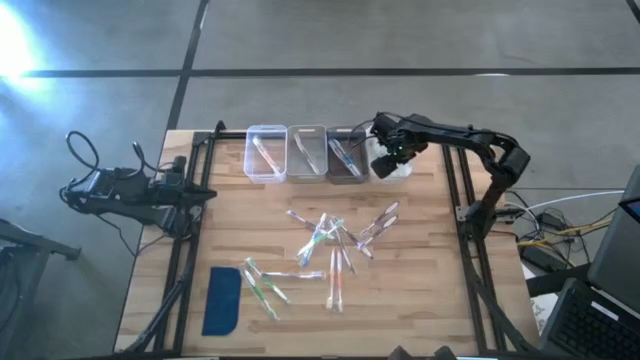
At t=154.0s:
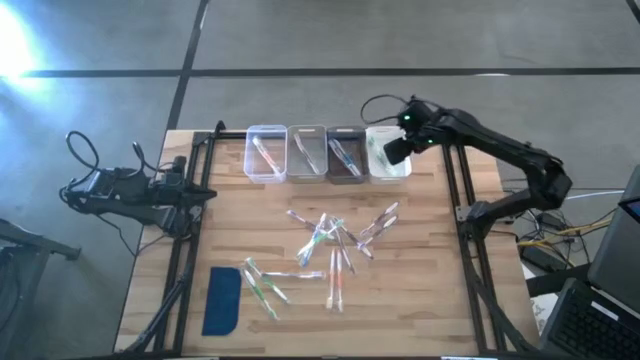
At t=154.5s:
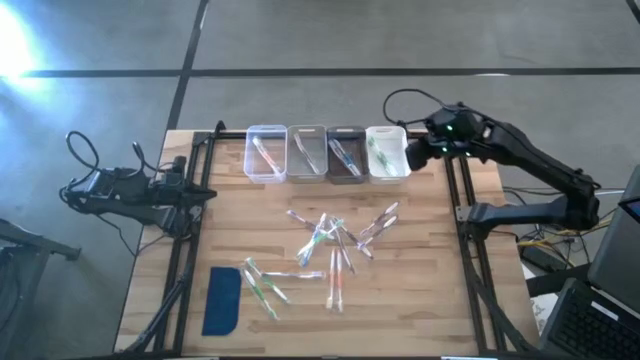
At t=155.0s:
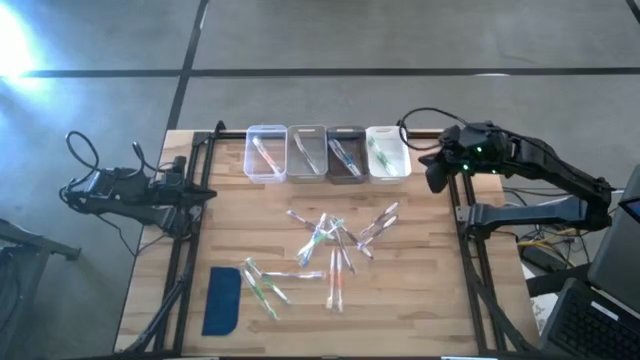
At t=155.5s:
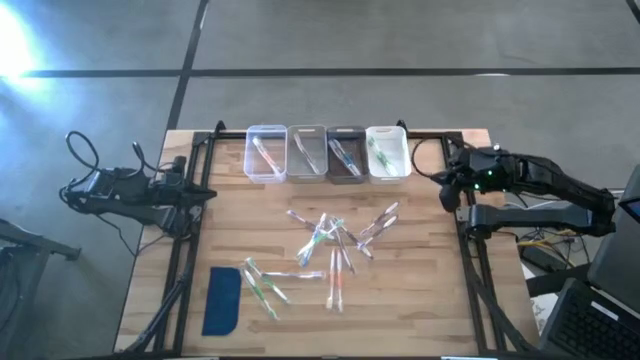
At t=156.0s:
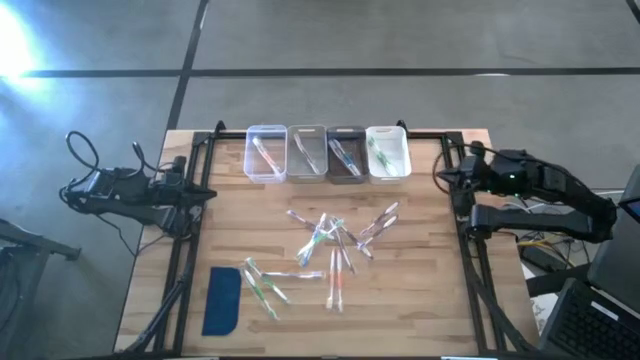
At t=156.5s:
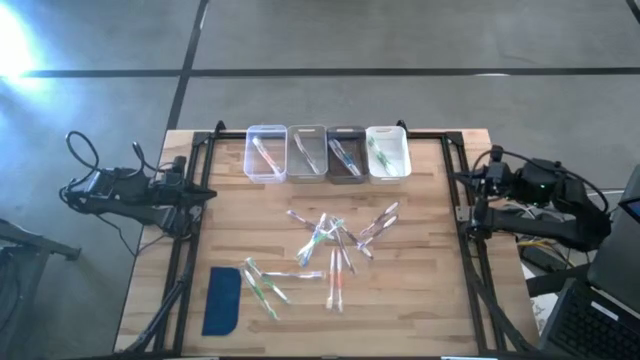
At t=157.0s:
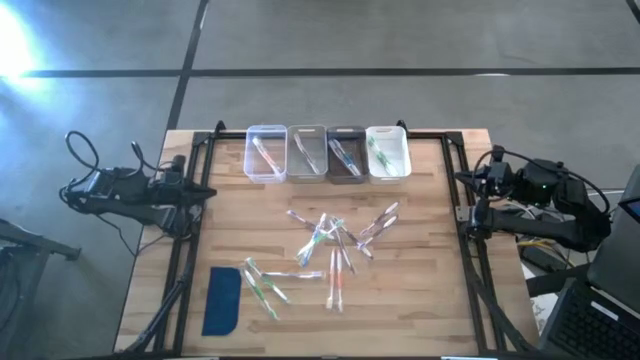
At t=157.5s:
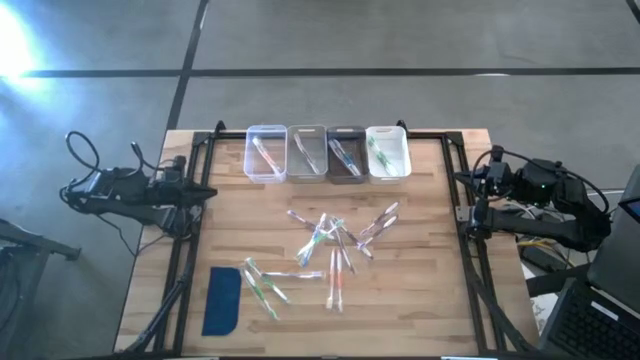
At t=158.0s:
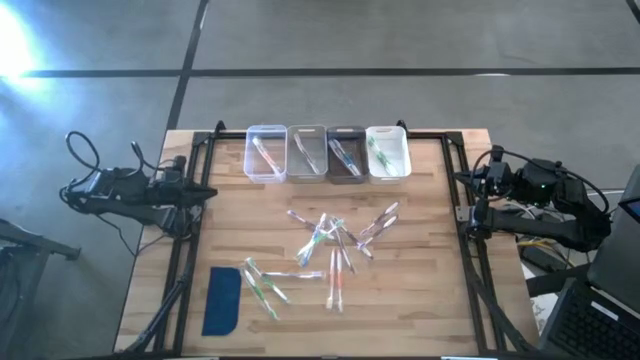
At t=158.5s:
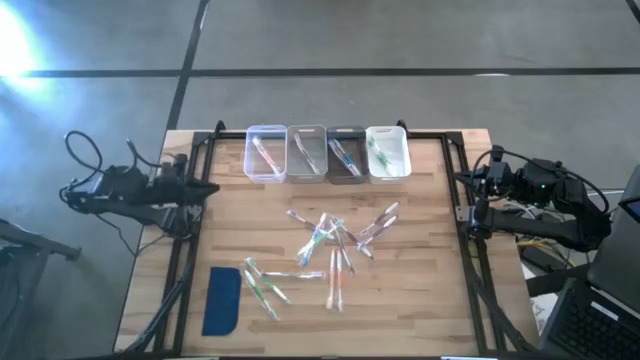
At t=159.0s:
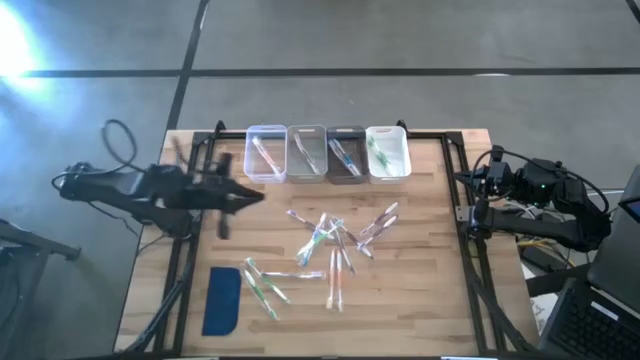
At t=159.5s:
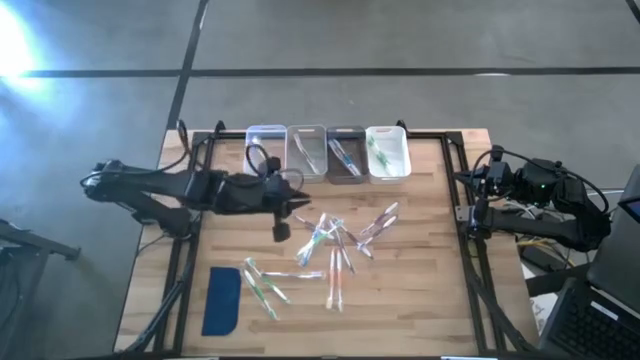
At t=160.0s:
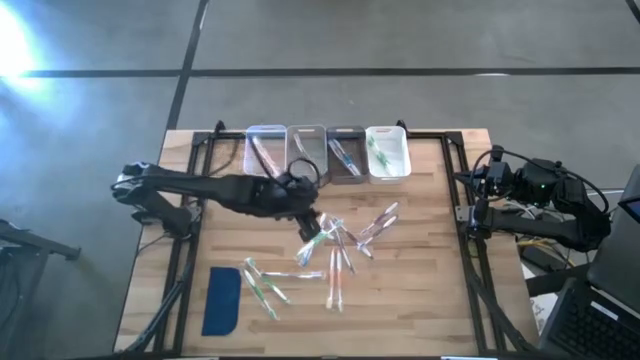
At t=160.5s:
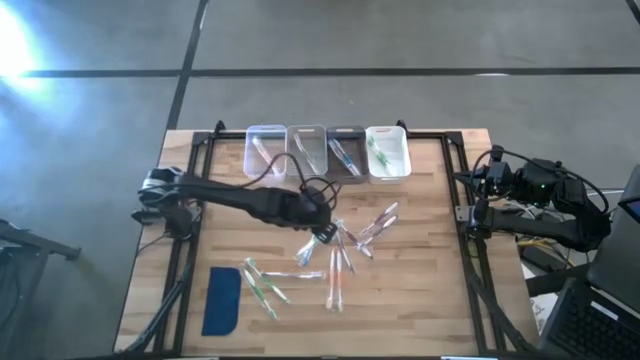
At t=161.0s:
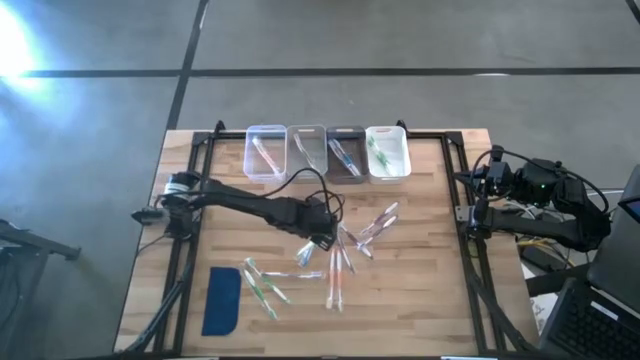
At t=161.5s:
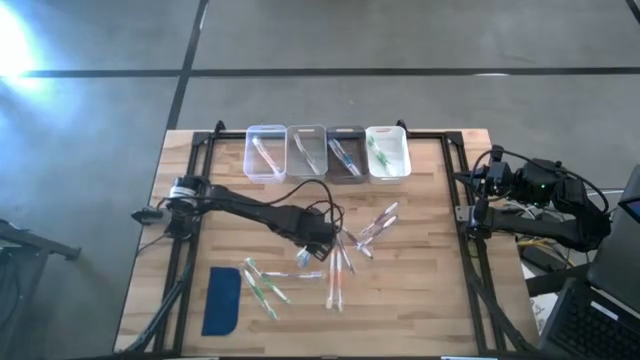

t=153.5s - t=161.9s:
Task: Pick & Place Toothbrushes
Put the blue toothbrush into the black transparent bin

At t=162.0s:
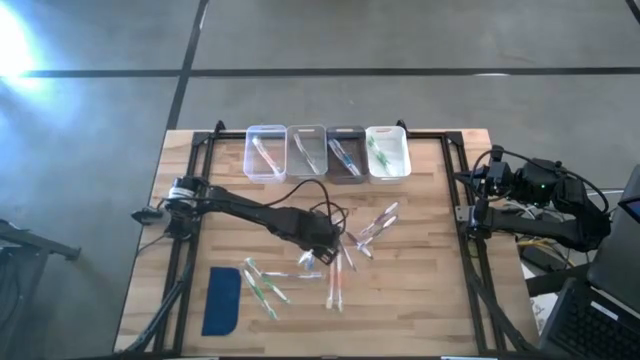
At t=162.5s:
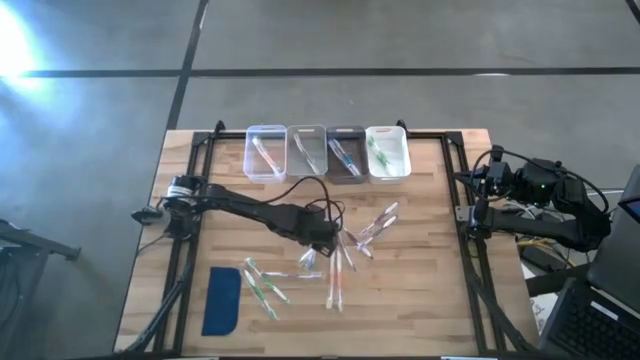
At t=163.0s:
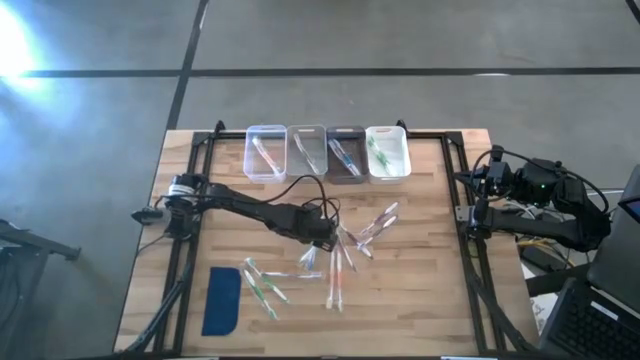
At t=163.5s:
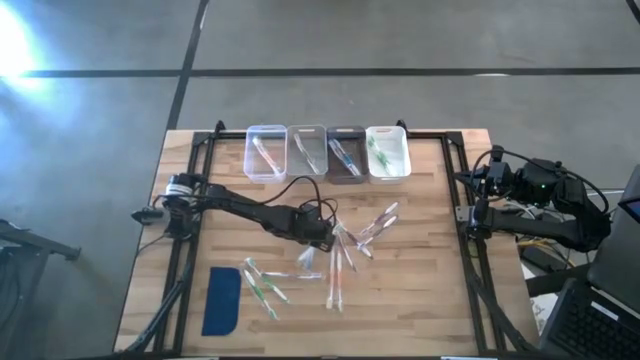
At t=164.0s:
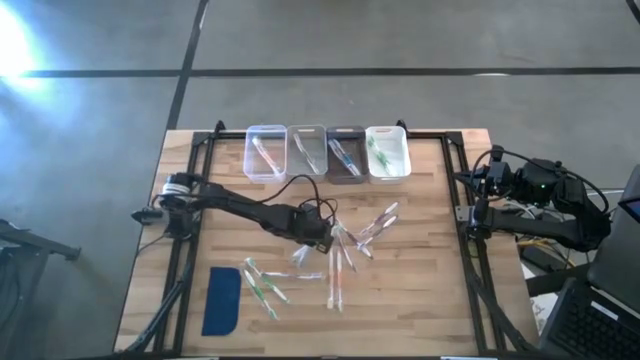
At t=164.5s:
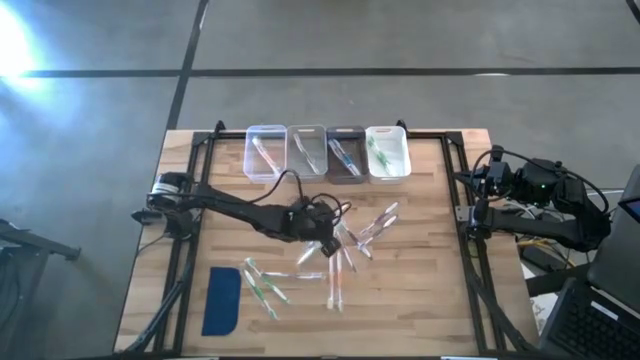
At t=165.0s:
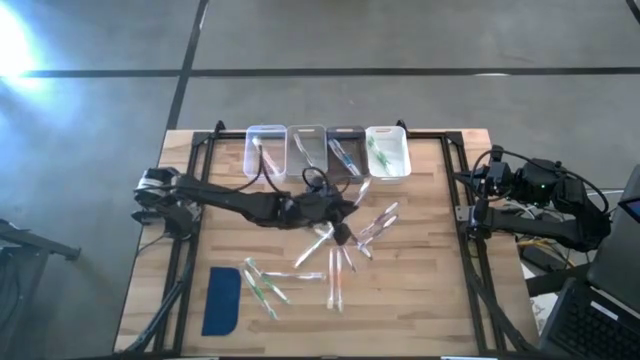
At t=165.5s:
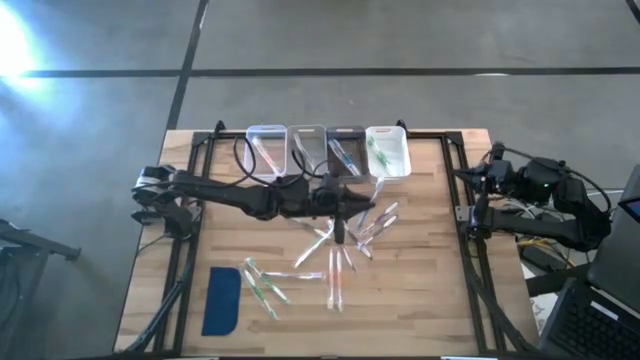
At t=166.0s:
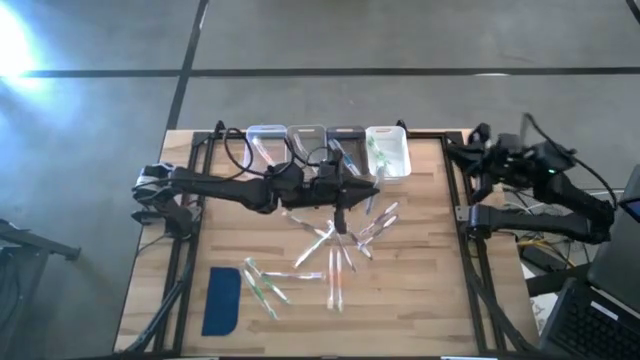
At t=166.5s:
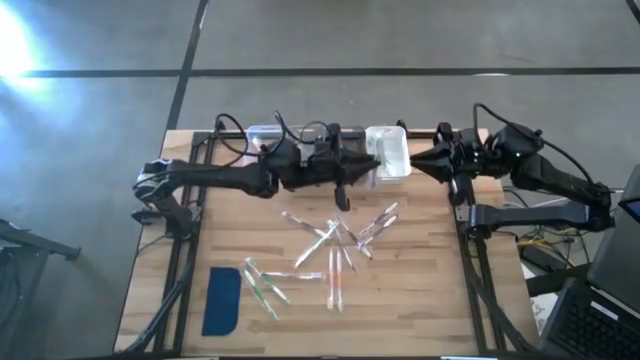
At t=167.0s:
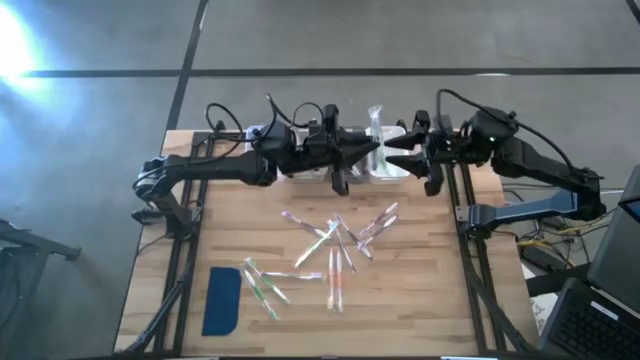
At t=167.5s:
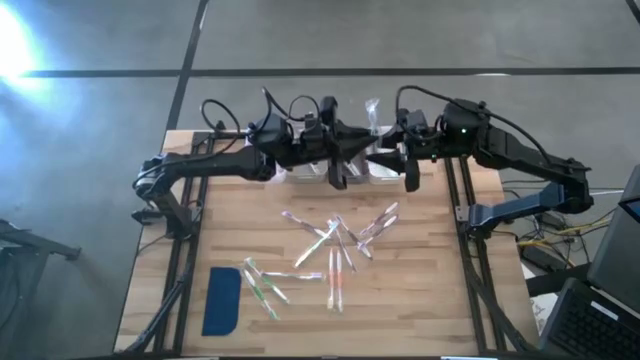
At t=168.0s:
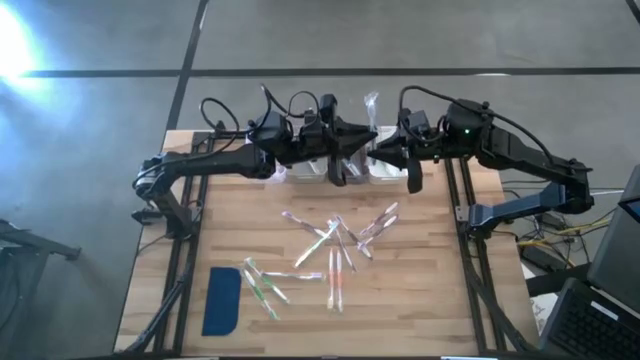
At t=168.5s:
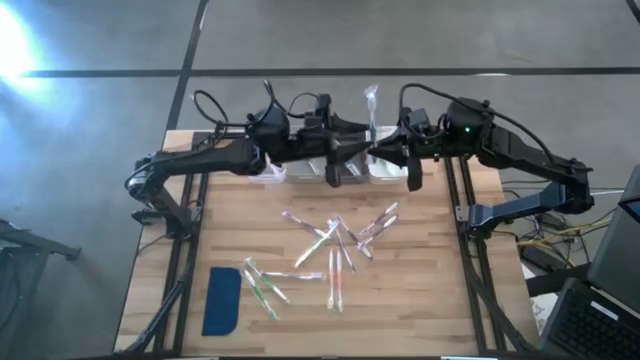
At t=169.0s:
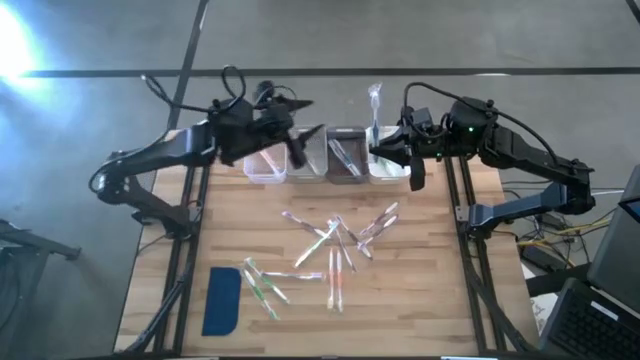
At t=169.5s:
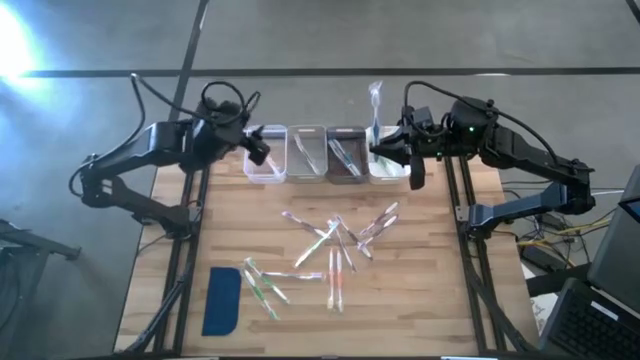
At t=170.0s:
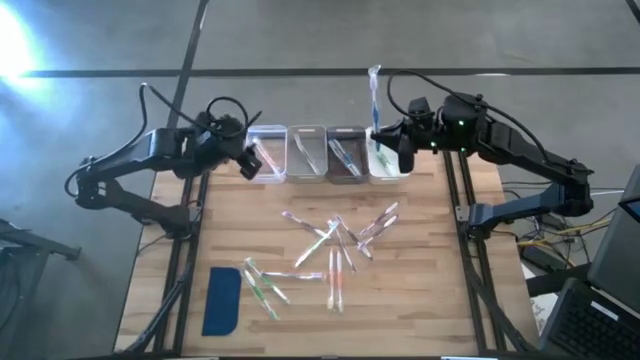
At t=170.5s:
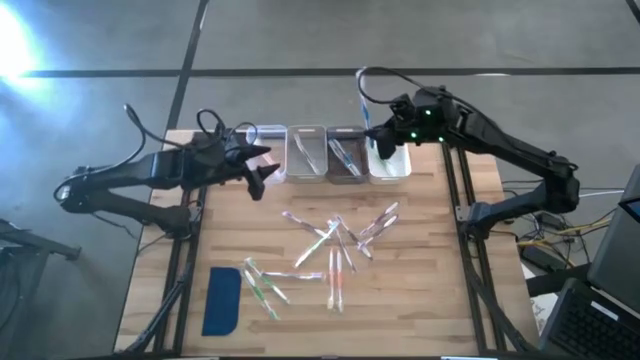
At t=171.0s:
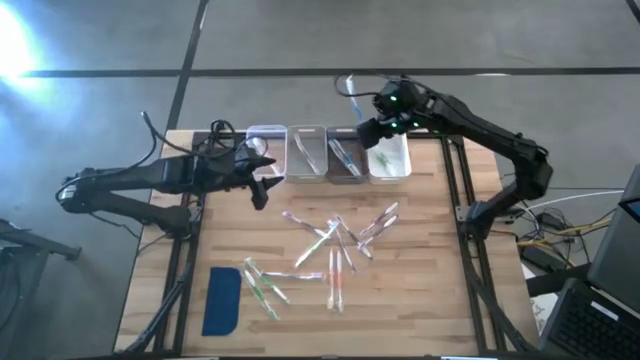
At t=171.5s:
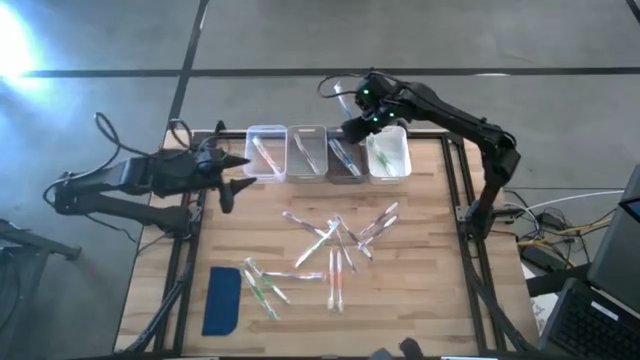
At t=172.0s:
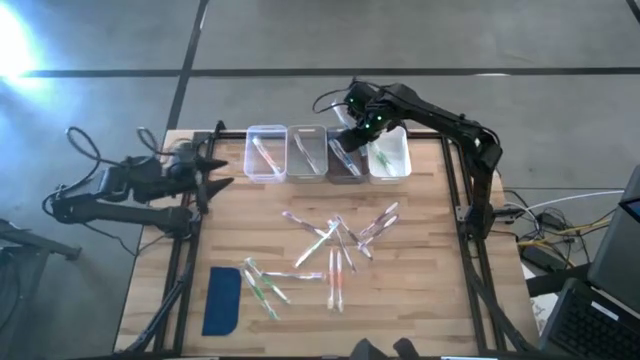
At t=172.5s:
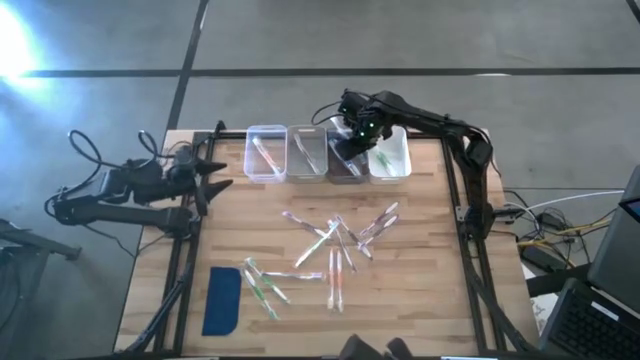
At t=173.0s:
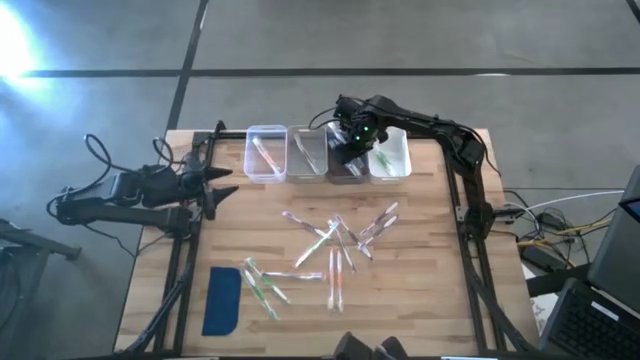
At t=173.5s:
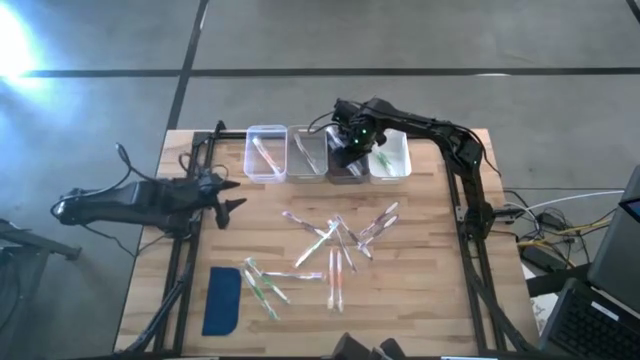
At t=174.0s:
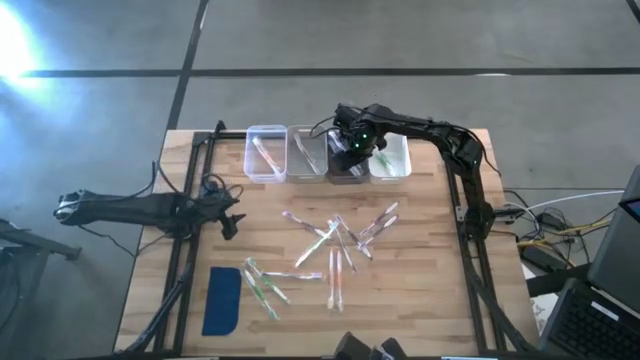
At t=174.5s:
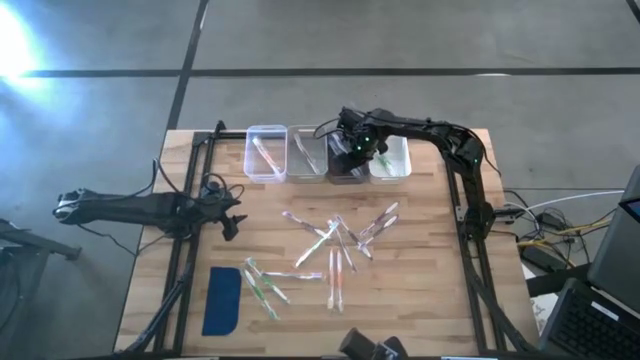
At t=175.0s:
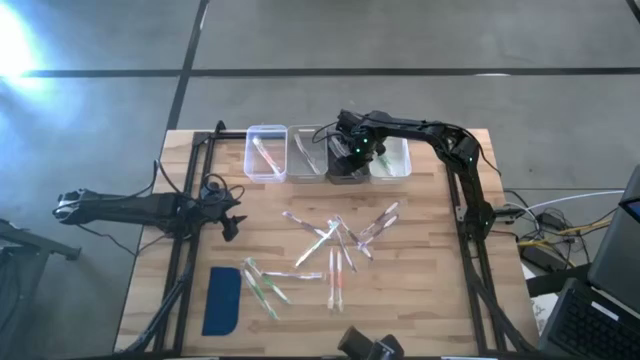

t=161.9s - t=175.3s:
Put the blue toothbrush into the black transparent bin
